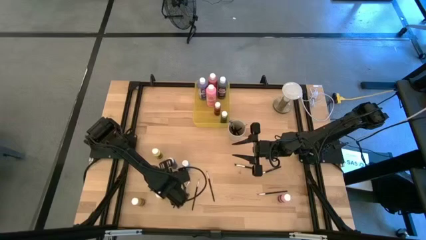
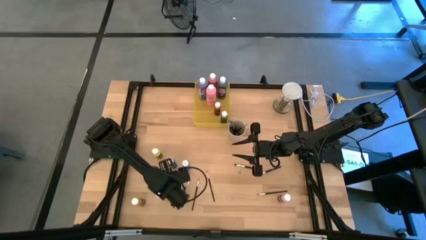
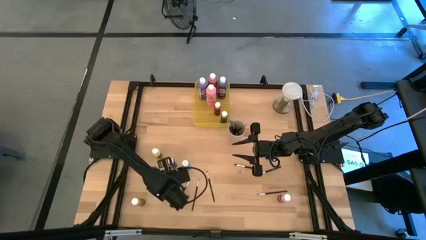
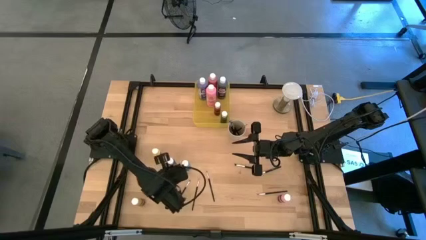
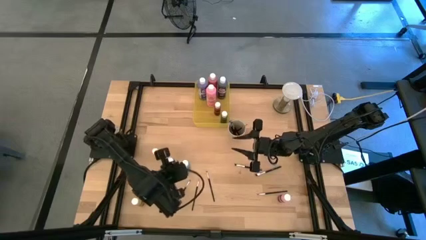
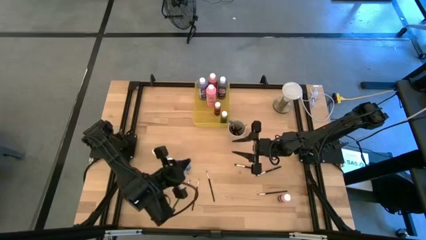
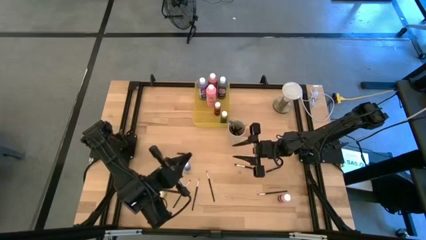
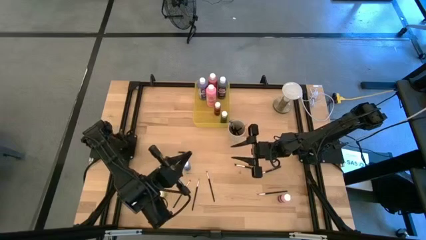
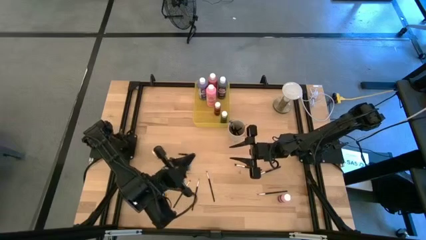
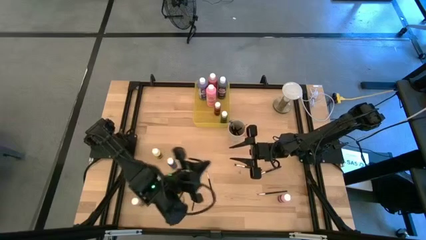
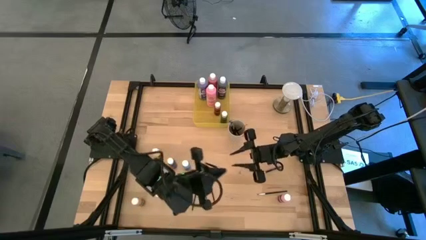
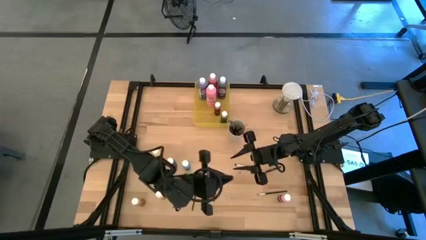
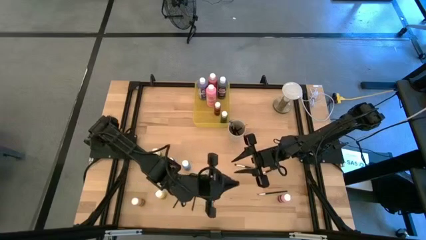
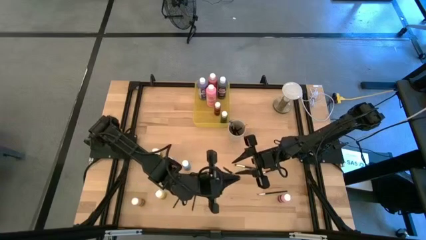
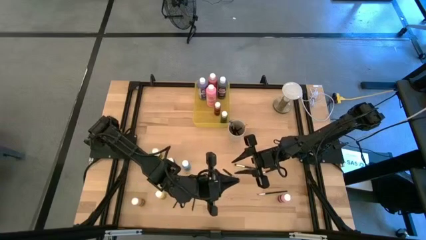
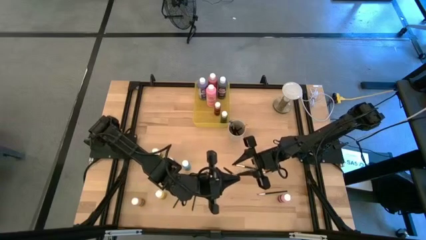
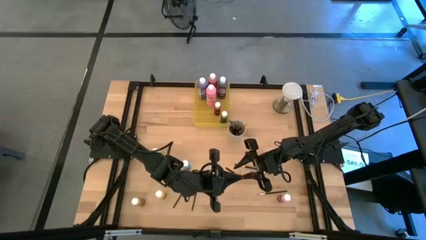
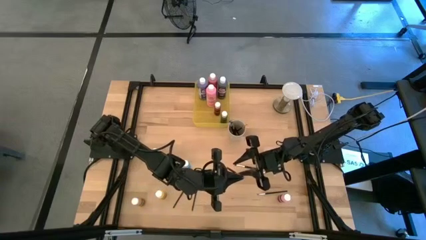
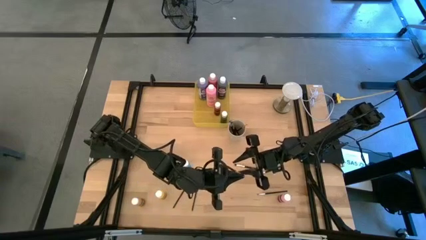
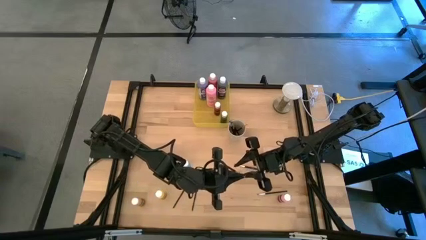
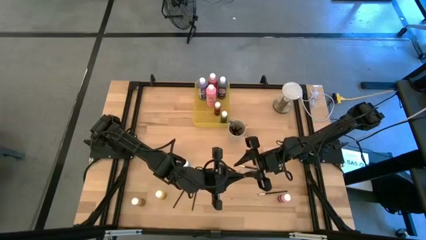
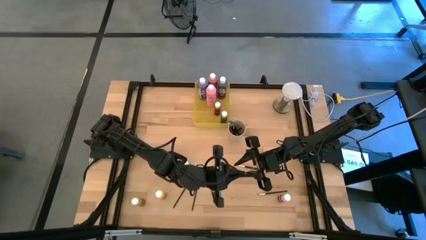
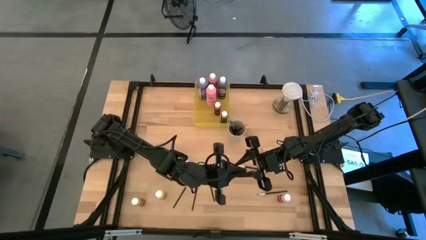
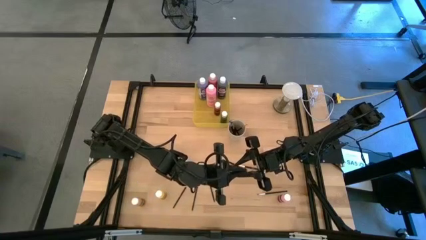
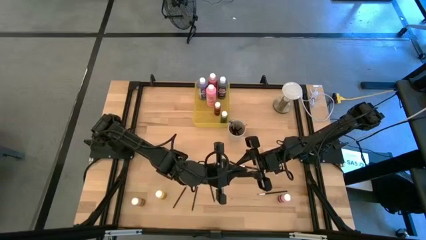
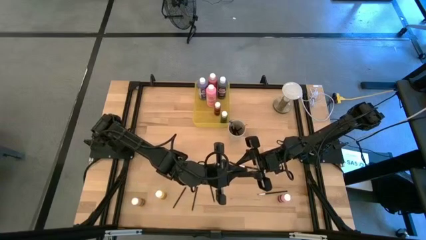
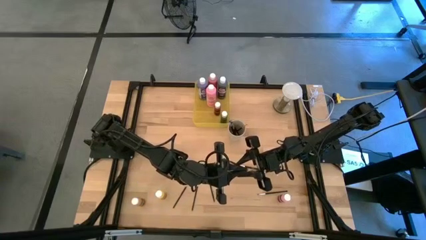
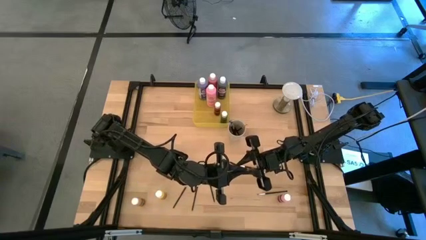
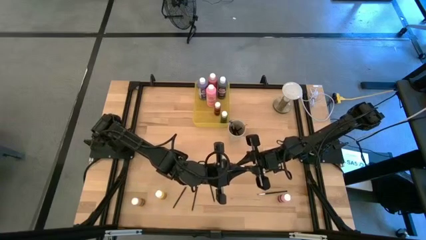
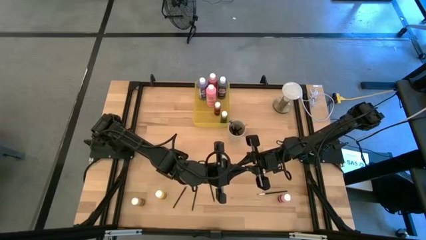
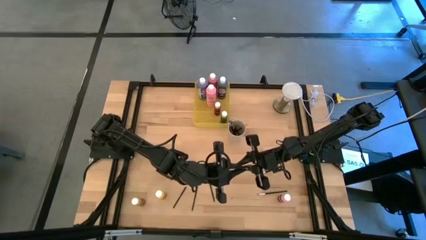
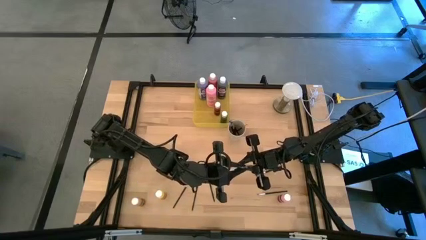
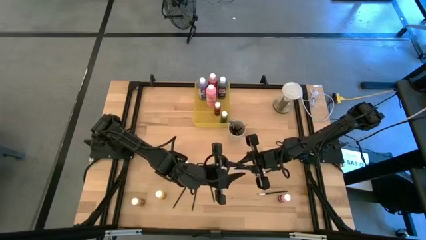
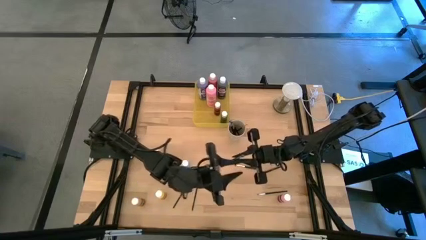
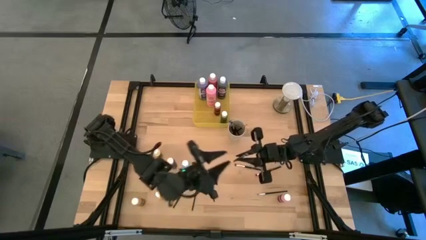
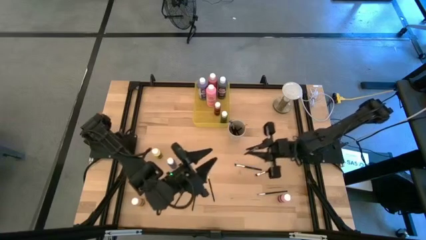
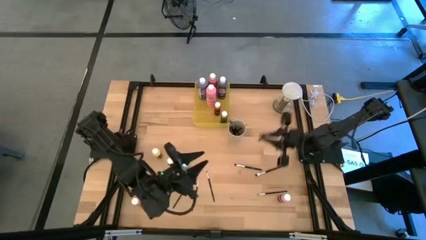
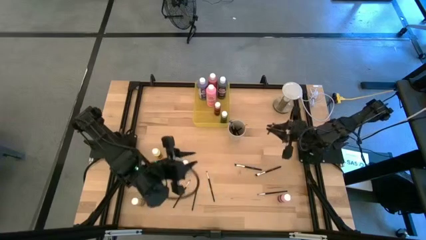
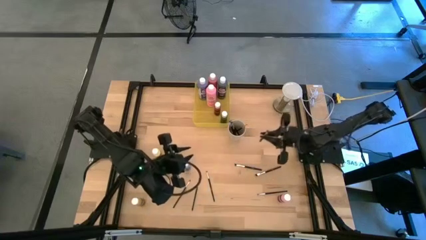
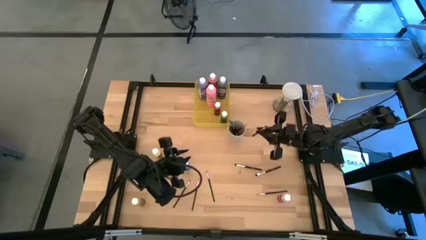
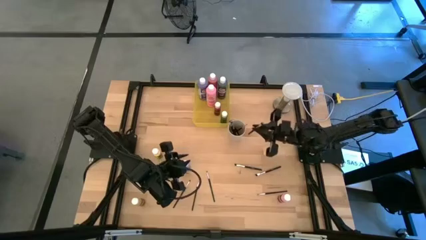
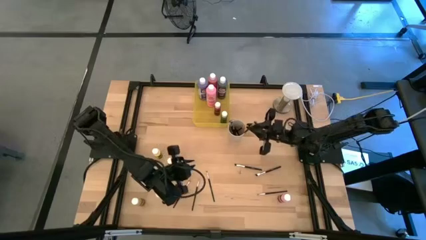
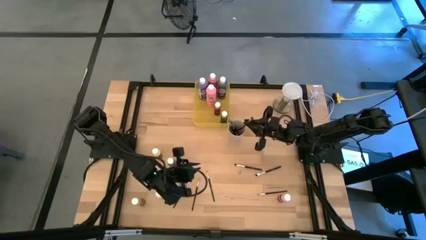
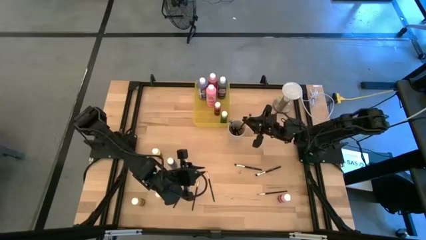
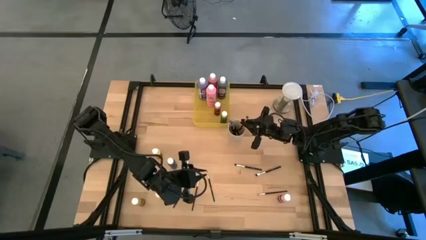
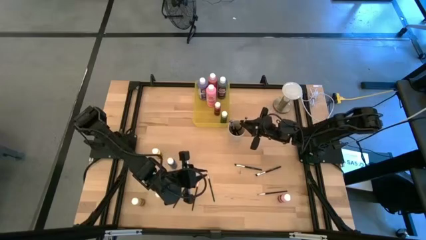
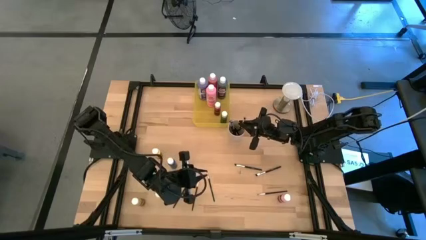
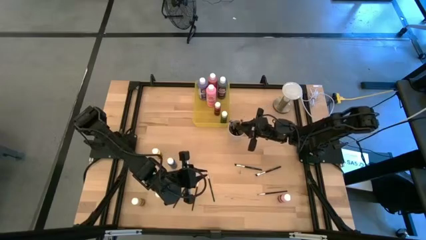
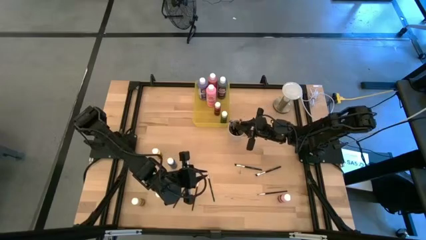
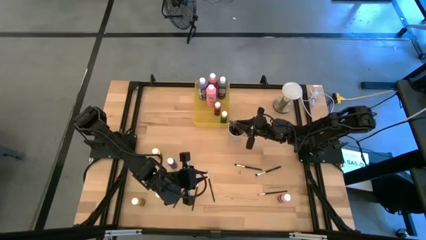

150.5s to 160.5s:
Task: Pick & Place Paint Supplies
Put the black paintbrush into the white cup

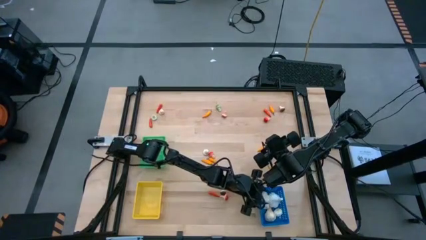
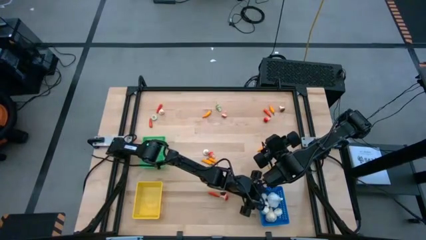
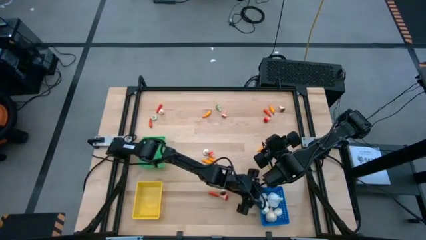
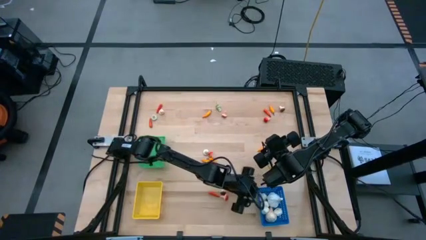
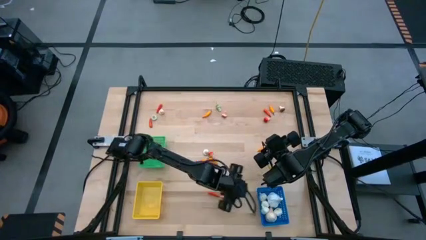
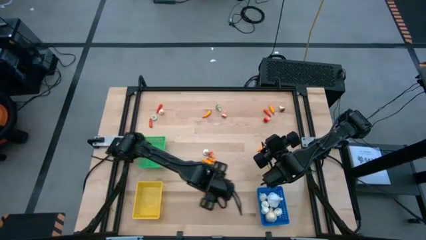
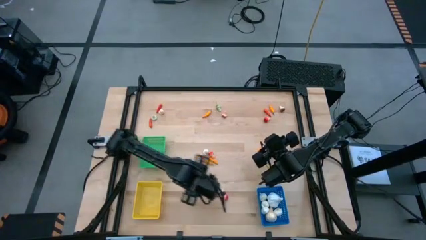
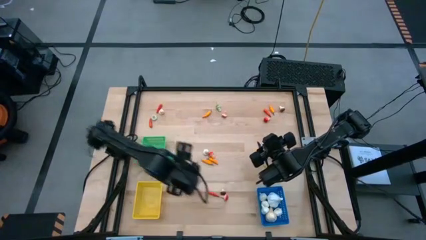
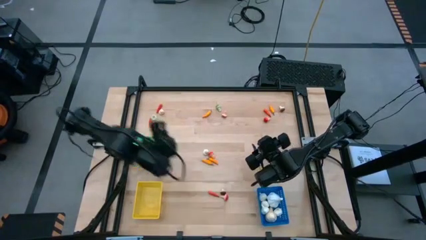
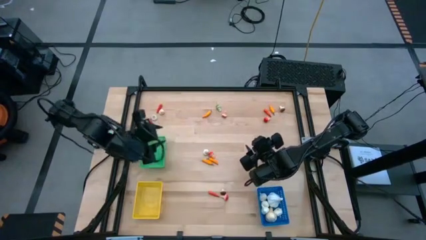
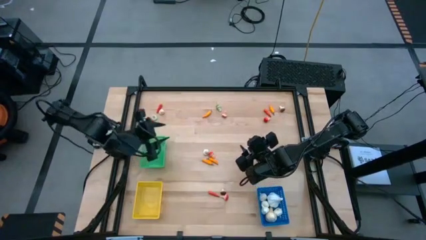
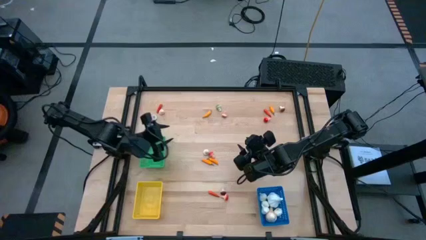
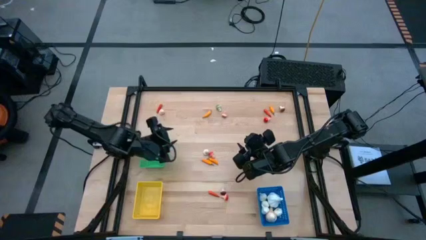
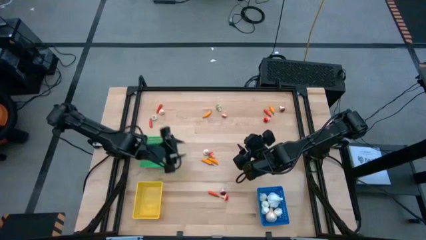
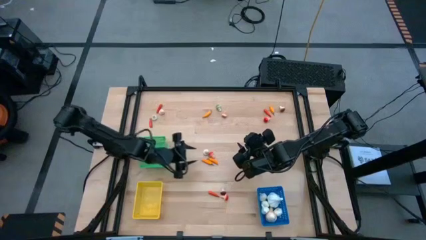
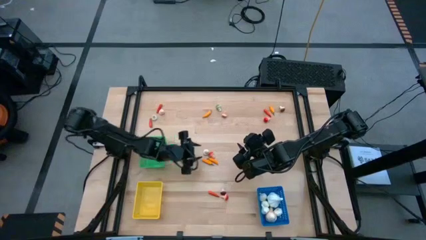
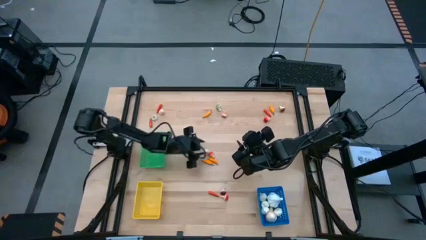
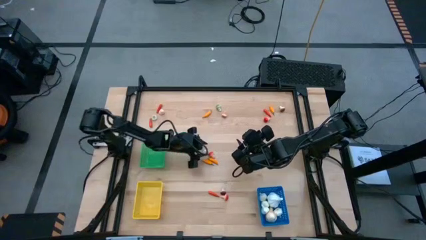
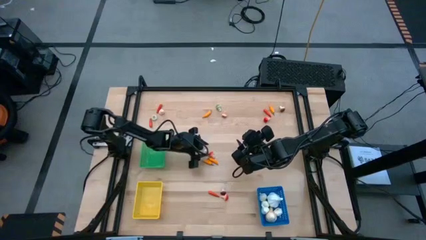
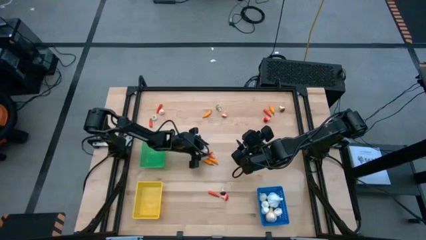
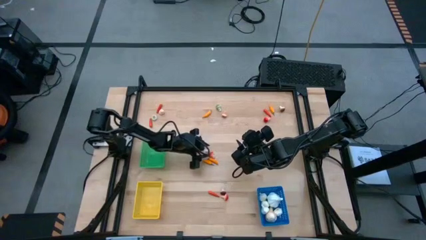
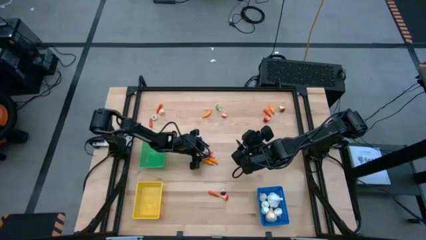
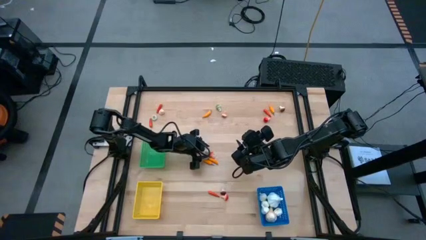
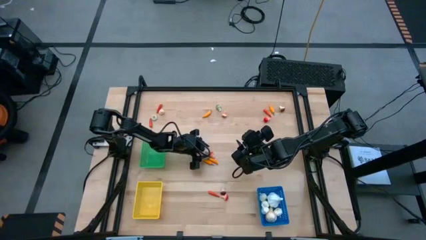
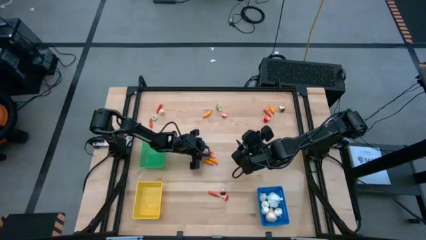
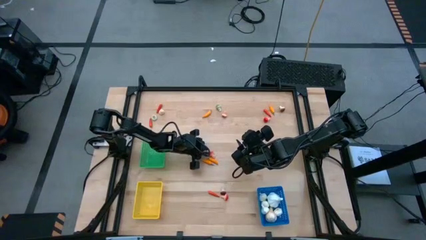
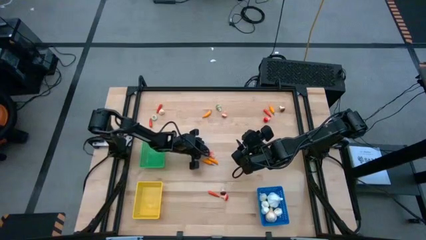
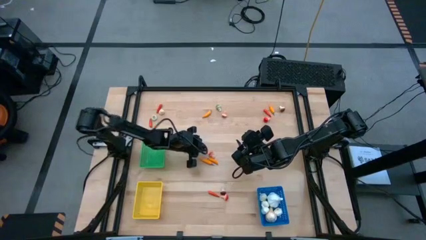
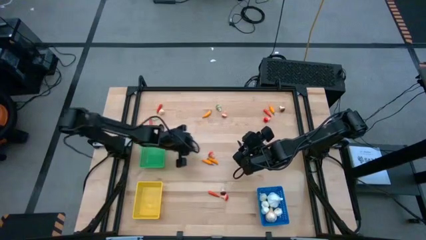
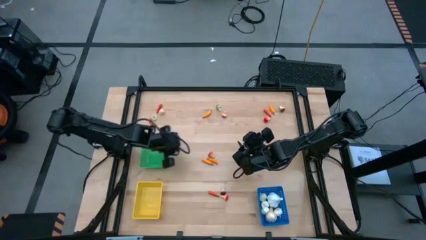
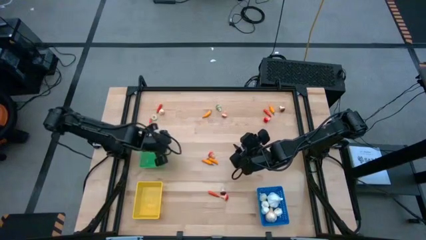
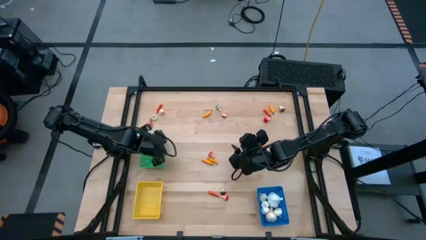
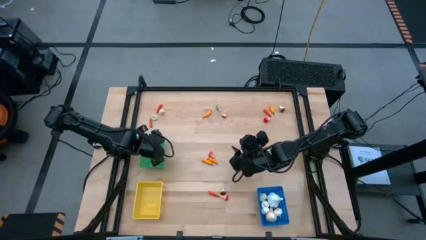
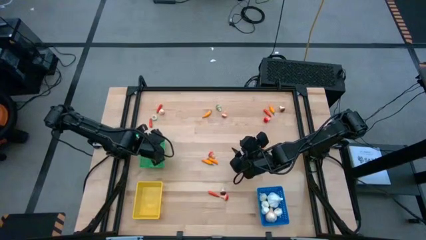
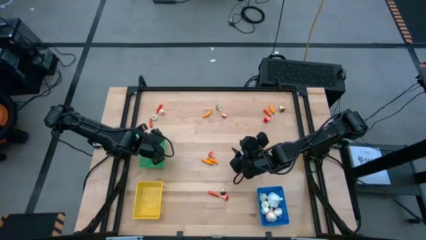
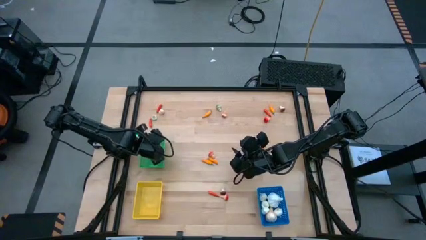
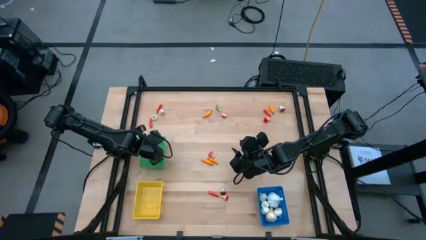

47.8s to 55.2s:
Task: Sort produce into baskets
Put the brown mushroom into the green bin
